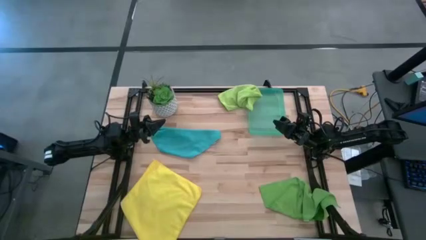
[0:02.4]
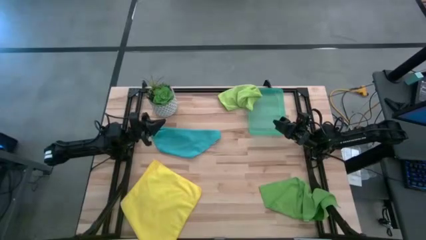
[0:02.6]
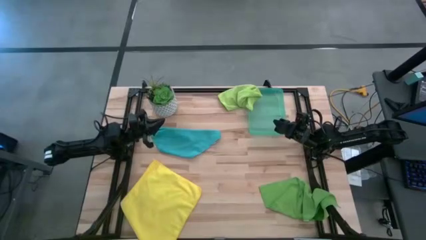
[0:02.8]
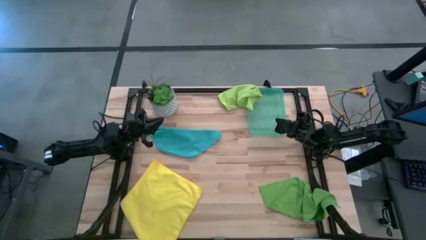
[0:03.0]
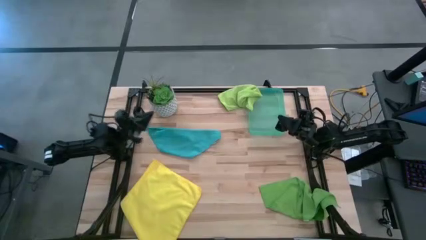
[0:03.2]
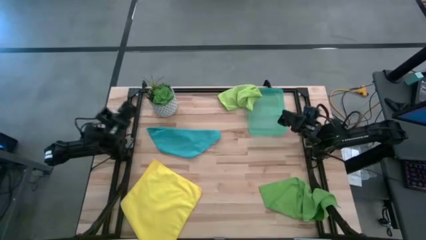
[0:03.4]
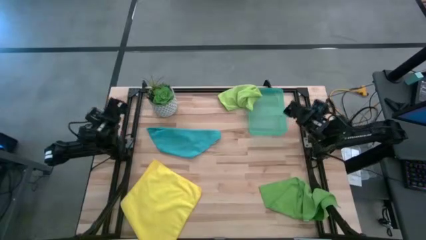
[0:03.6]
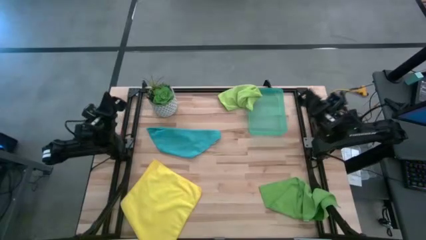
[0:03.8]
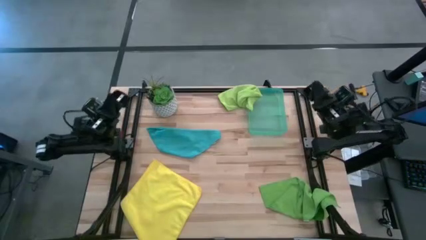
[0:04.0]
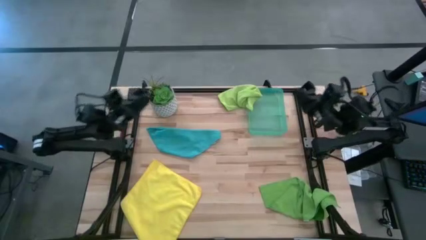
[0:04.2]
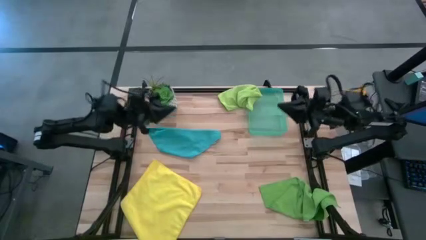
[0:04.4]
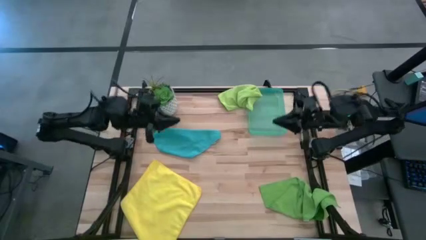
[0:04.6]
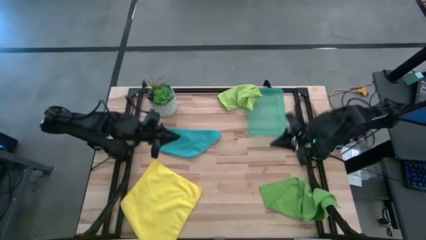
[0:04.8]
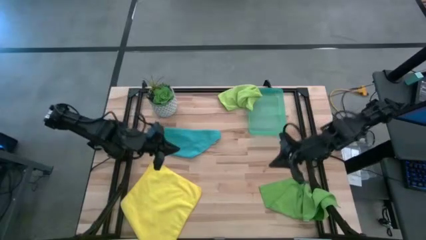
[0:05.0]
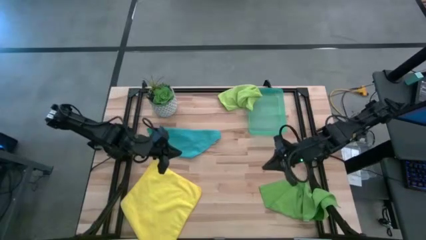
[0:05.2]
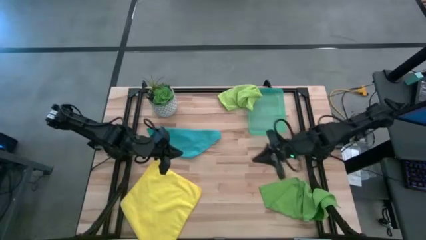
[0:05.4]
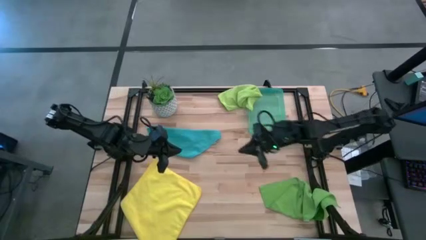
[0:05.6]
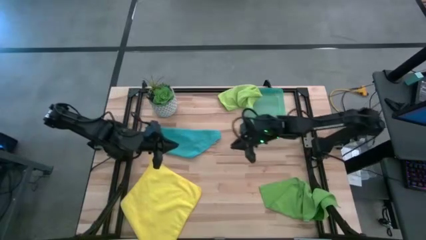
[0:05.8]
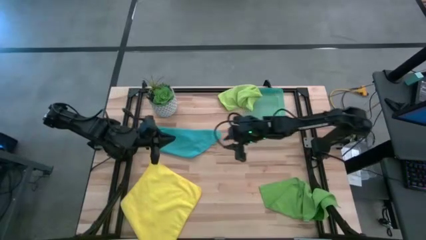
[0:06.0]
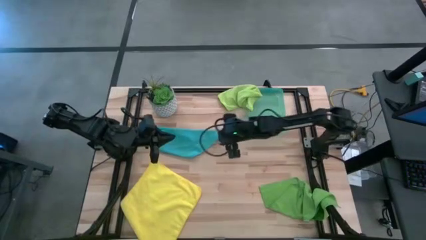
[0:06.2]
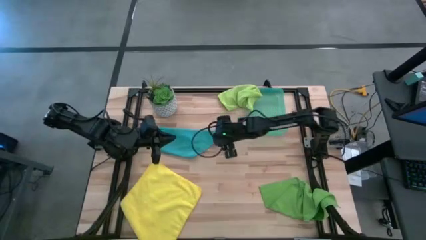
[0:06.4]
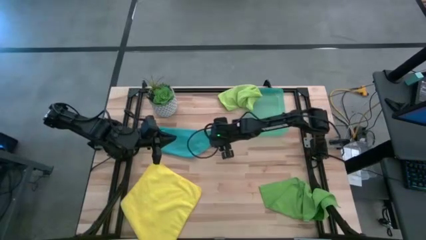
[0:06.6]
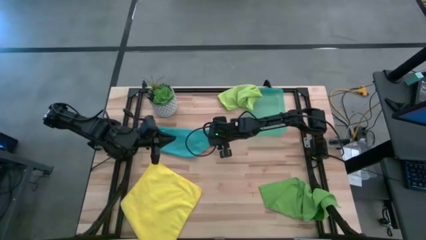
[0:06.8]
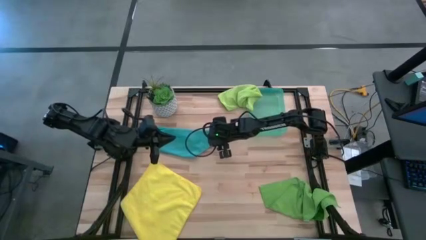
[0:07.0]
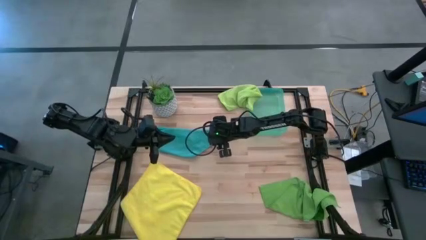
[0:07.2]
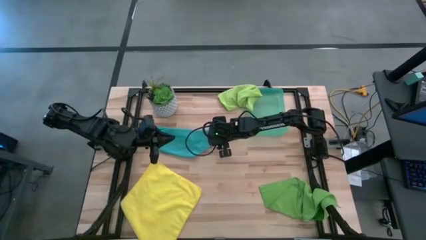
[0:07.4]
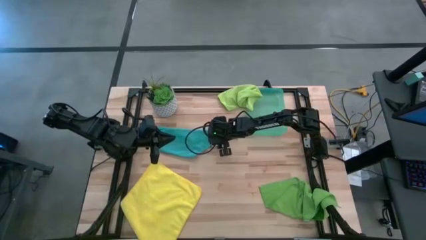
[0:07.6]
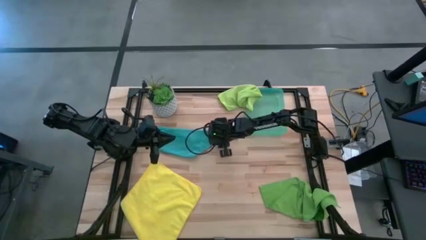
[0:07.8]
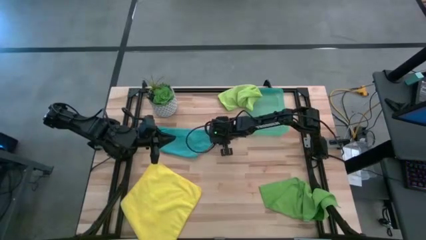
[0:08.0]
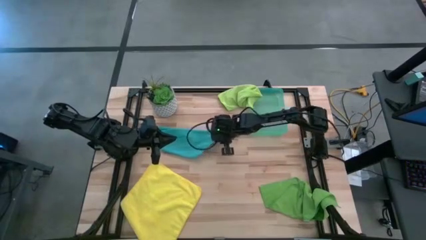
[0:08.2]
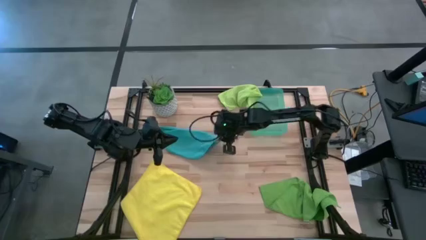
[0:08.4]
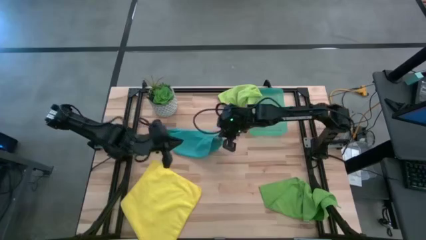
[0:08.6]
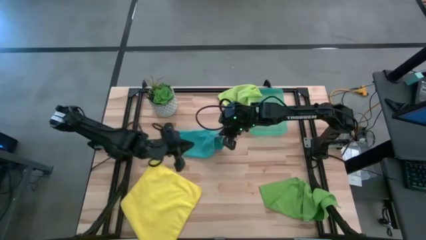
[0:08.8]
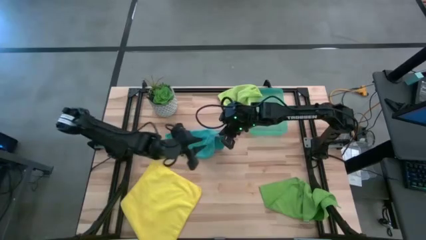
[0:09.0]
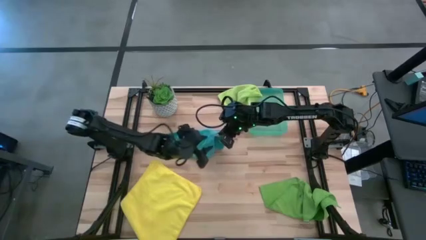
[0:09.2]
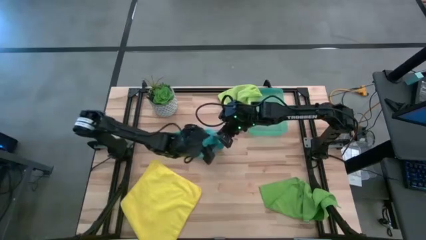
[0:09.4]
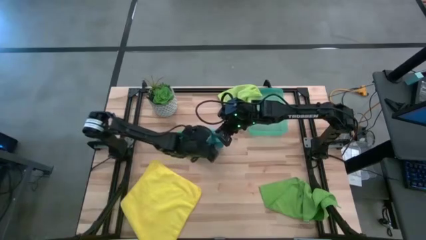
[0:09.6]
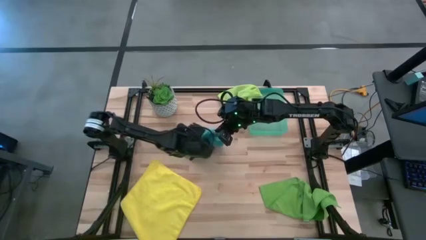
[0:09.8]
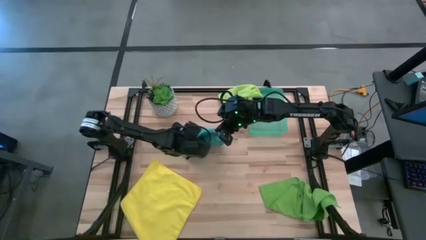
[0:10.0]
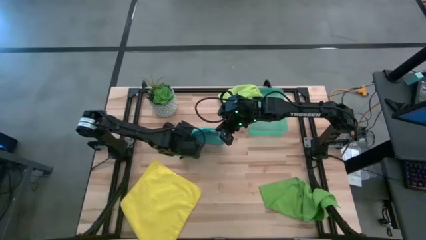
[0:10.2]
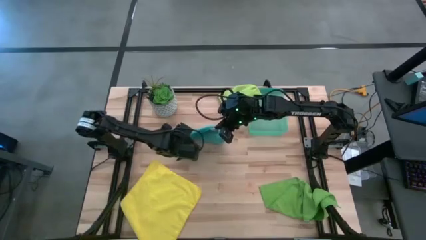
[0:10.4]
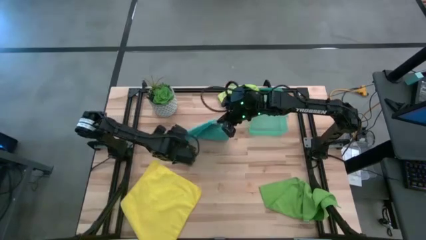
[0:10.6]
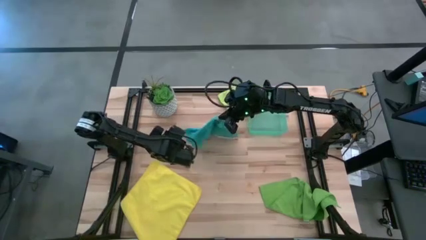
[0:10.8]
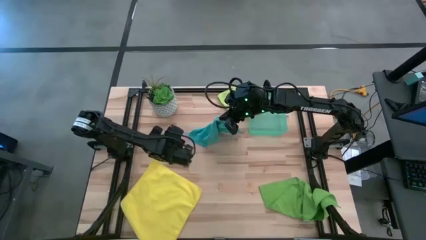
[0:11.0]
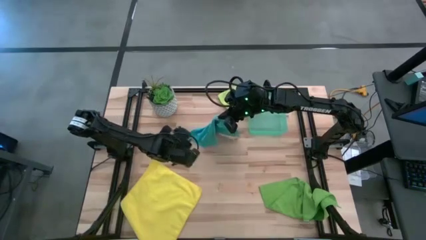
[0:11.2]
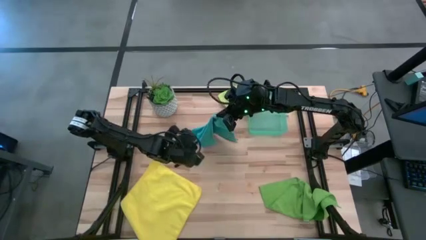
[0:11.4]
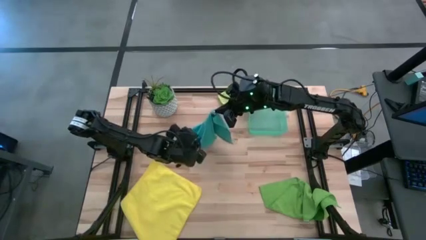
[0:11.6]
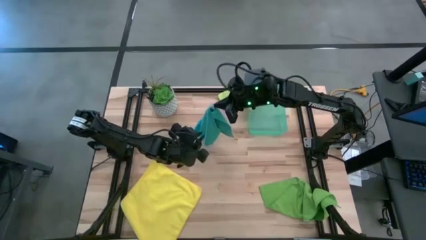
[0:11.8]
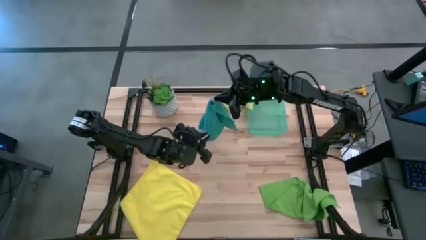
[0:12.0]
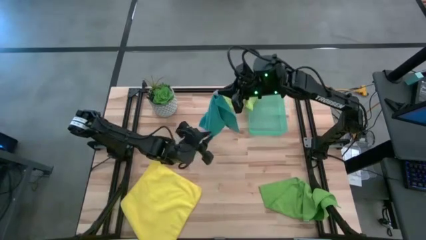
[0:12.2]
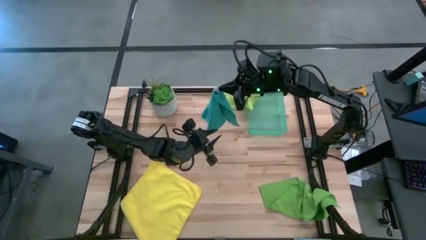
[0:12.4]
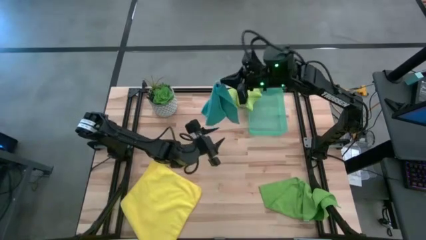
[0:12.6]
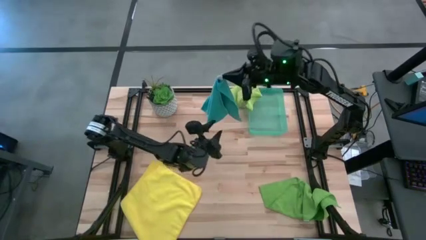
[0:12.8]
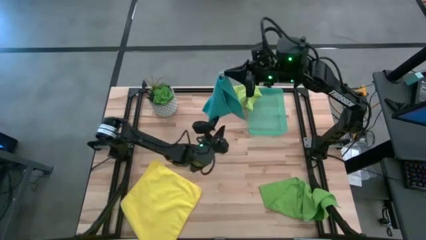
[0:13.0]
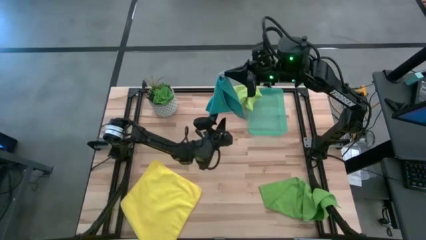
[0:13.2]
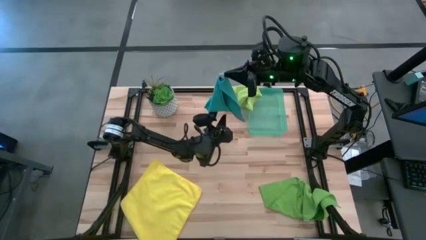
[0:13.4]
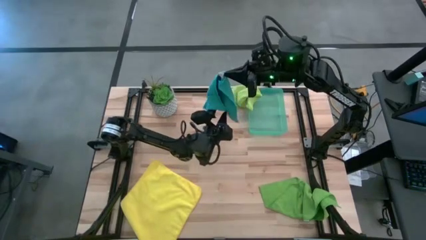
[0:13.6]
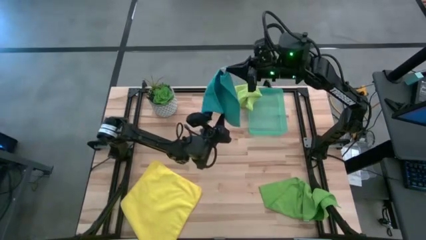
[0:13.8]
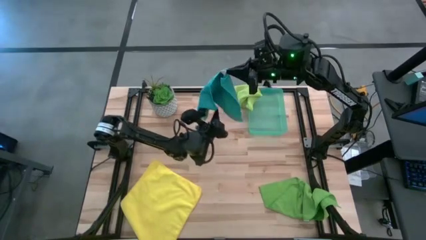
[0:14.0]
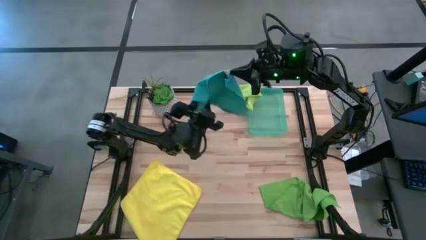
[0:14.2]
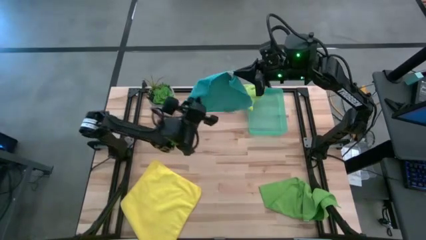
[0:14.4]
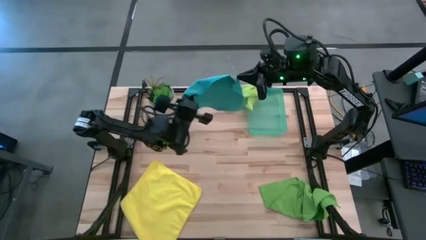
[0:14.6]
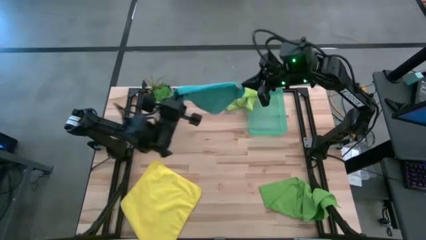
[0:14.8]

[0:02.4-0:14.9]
Task: Fold microfiber towels
Fold the blue towel
